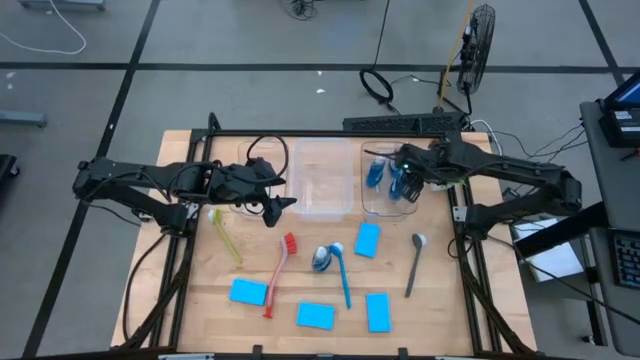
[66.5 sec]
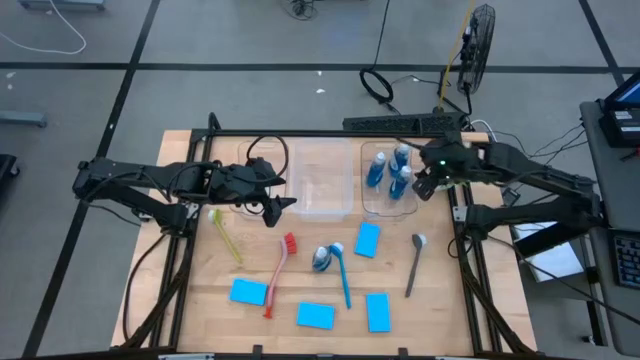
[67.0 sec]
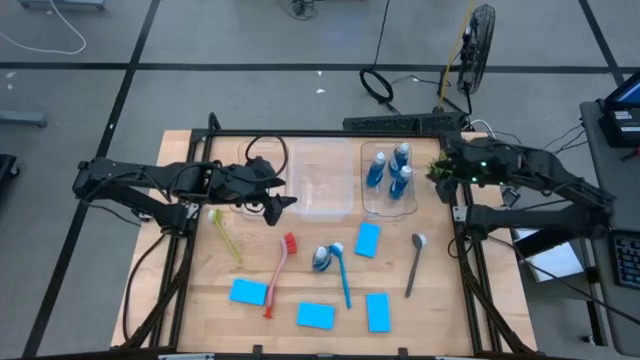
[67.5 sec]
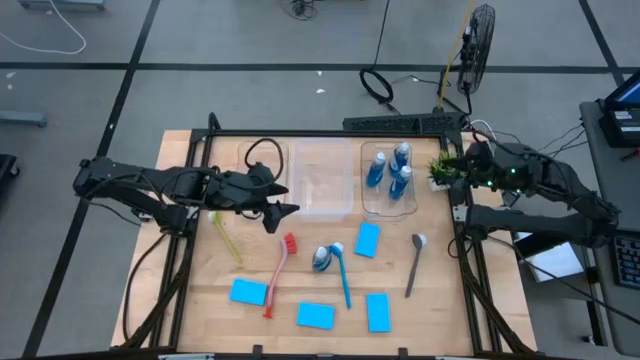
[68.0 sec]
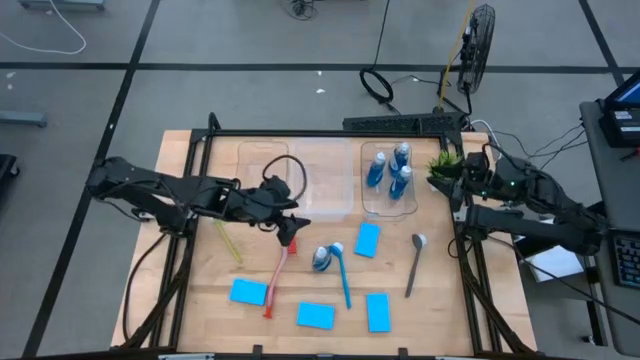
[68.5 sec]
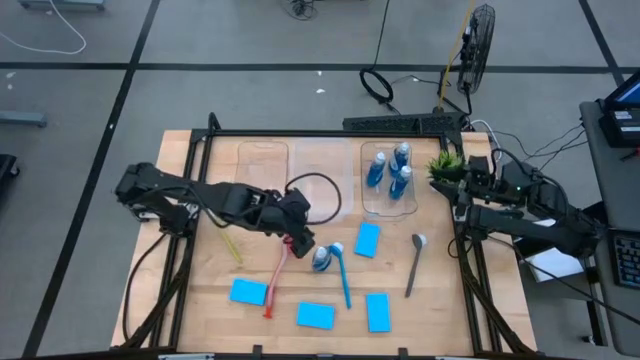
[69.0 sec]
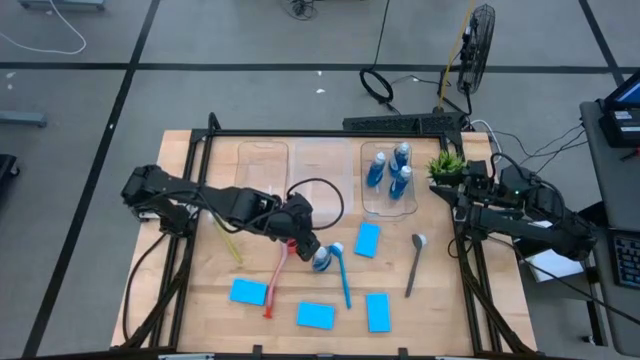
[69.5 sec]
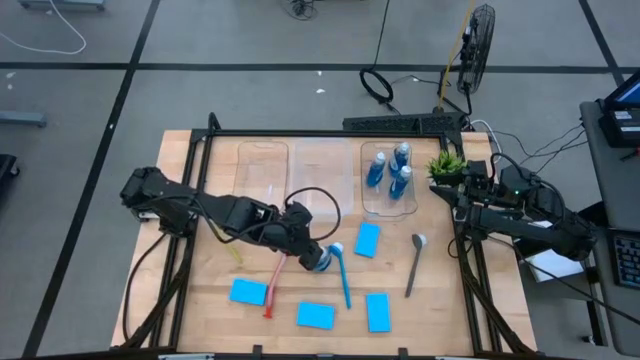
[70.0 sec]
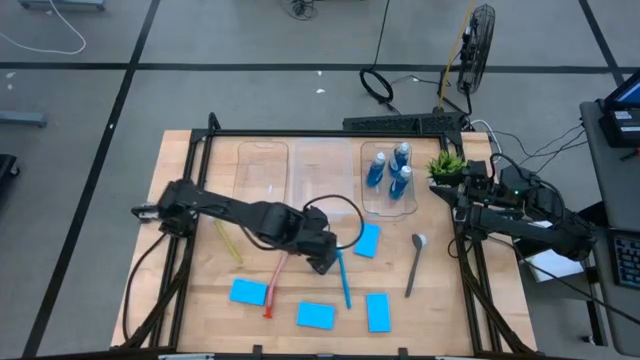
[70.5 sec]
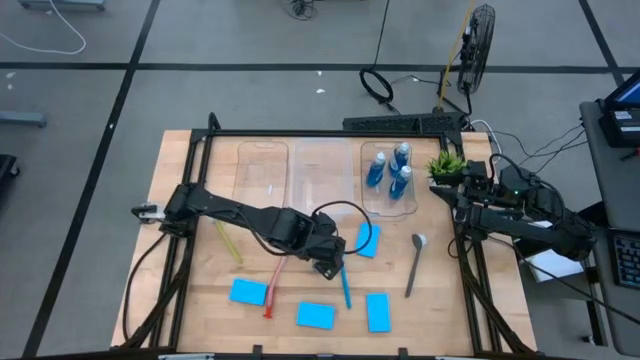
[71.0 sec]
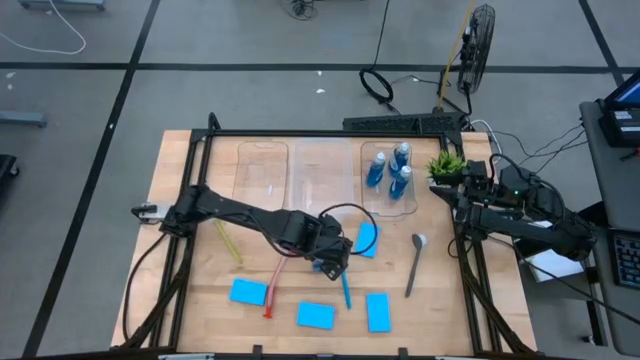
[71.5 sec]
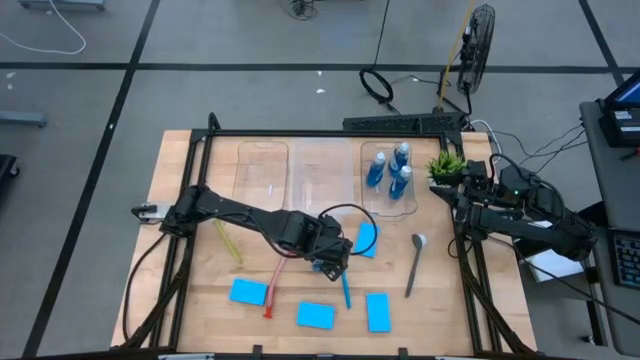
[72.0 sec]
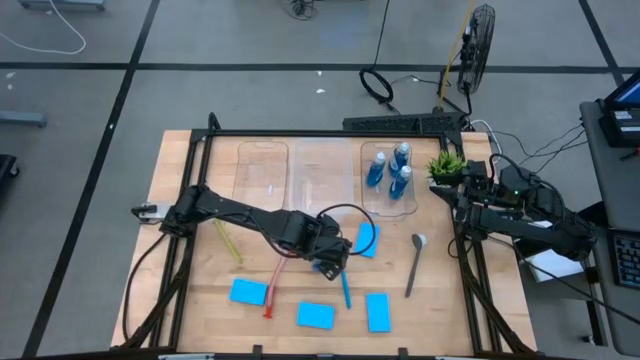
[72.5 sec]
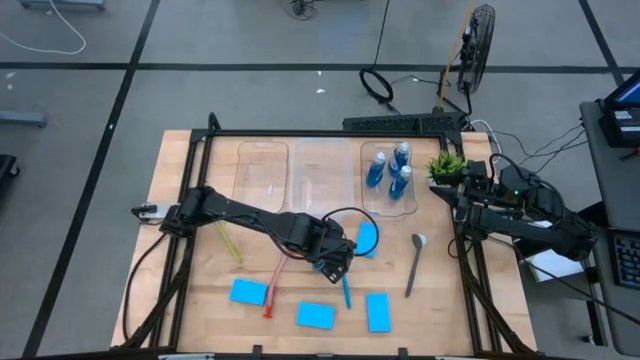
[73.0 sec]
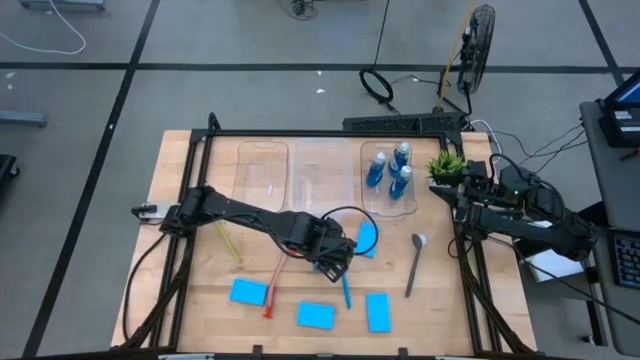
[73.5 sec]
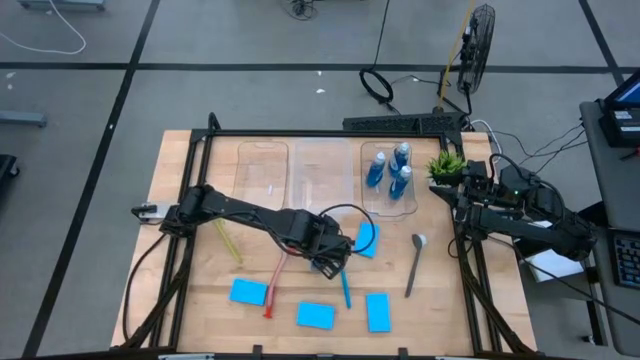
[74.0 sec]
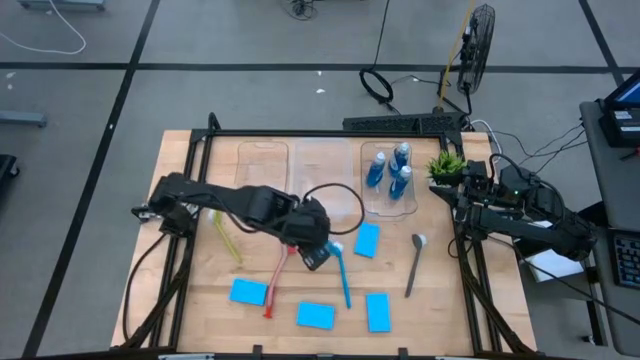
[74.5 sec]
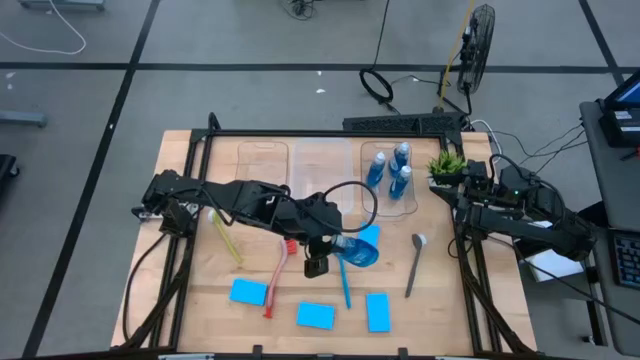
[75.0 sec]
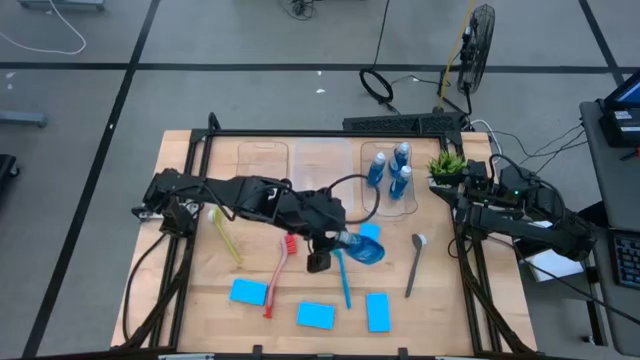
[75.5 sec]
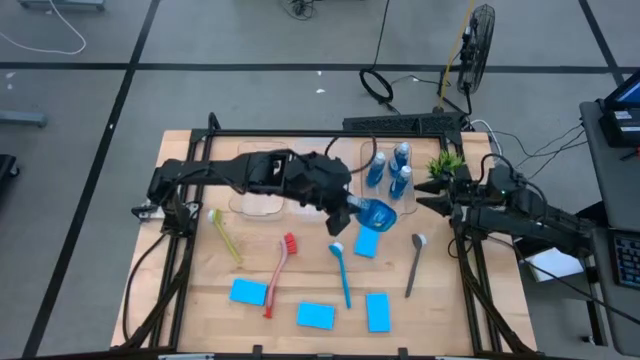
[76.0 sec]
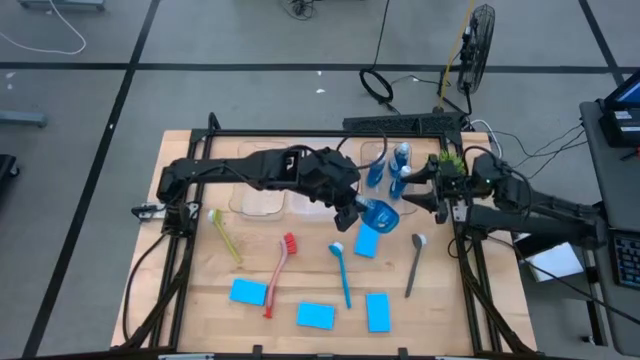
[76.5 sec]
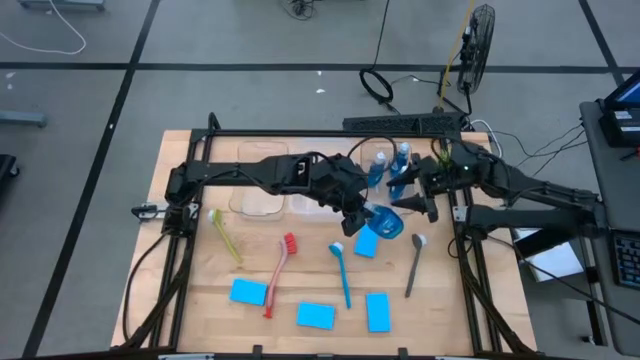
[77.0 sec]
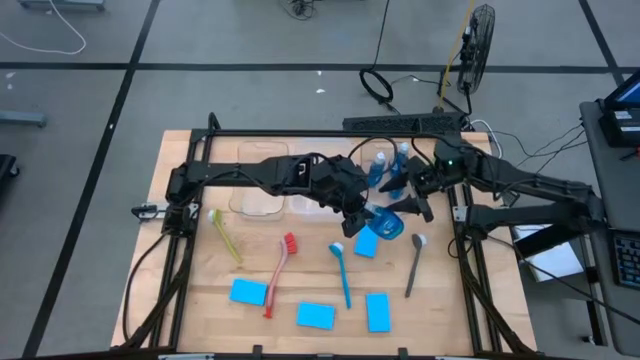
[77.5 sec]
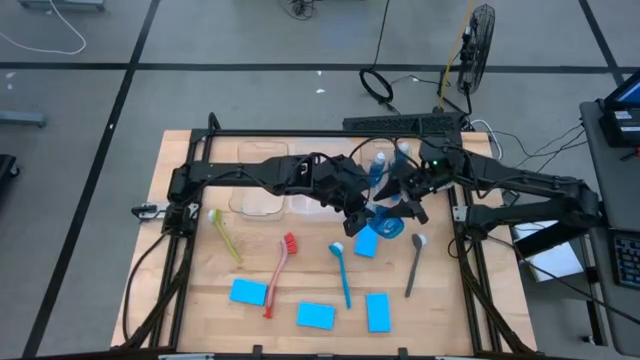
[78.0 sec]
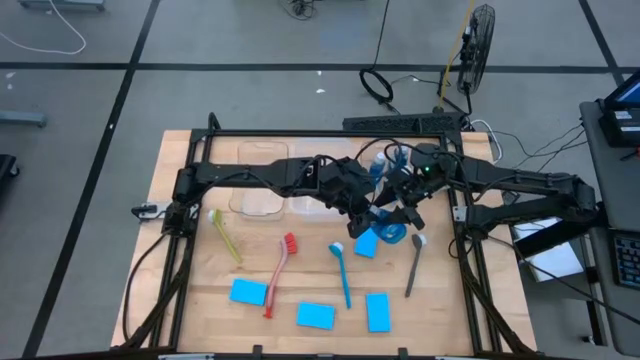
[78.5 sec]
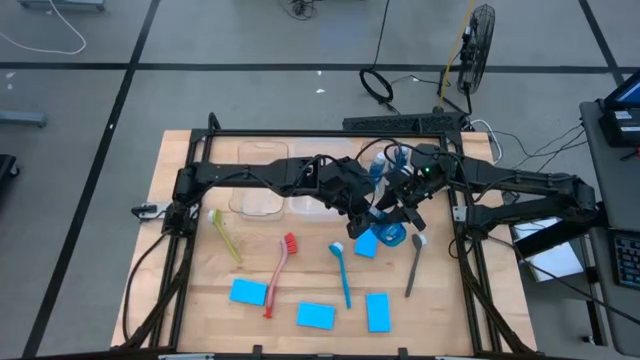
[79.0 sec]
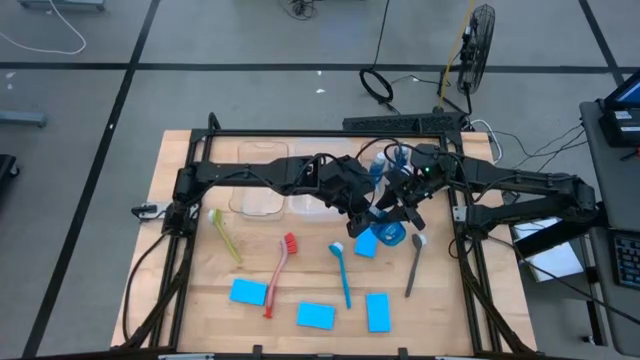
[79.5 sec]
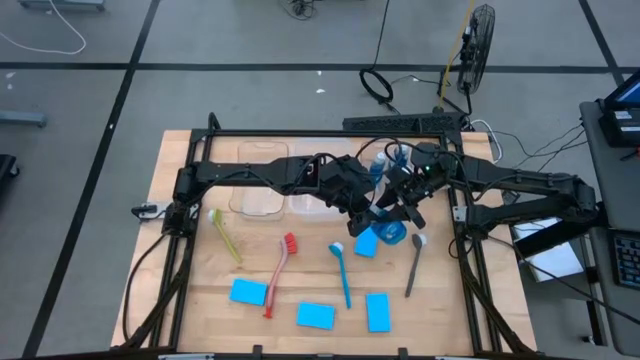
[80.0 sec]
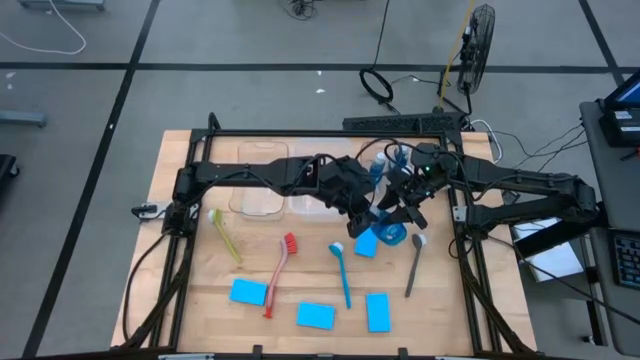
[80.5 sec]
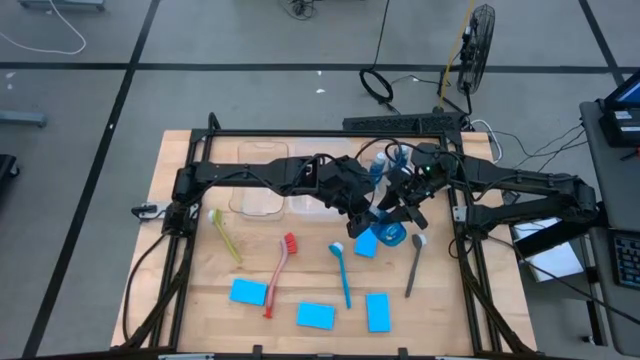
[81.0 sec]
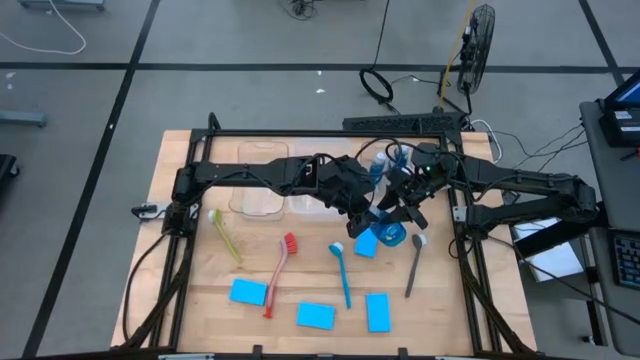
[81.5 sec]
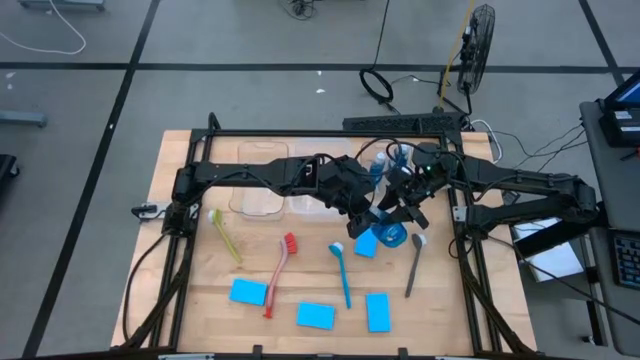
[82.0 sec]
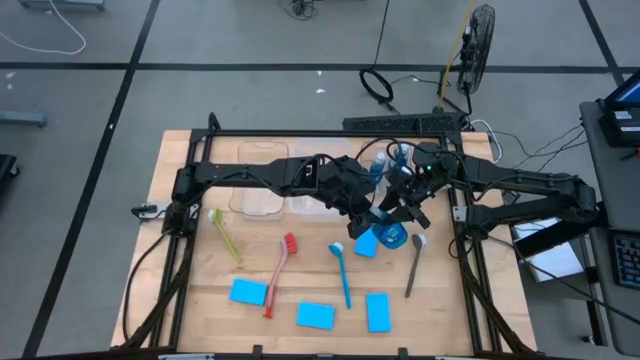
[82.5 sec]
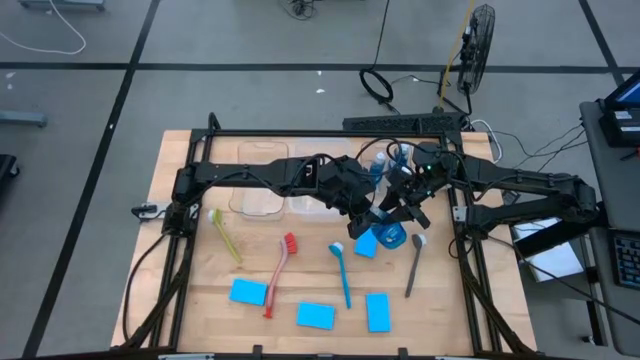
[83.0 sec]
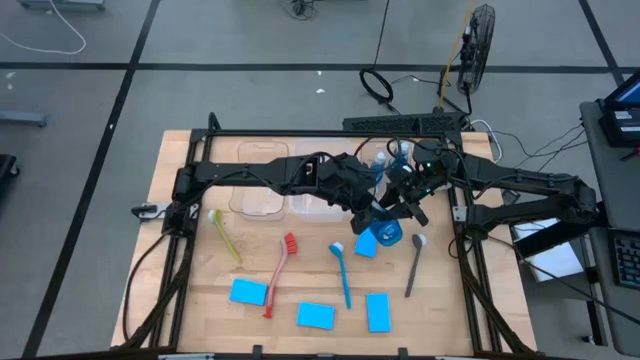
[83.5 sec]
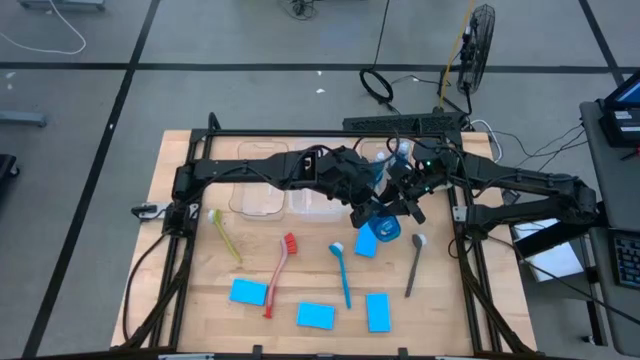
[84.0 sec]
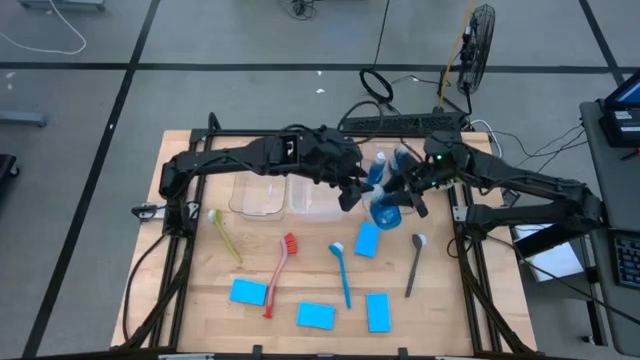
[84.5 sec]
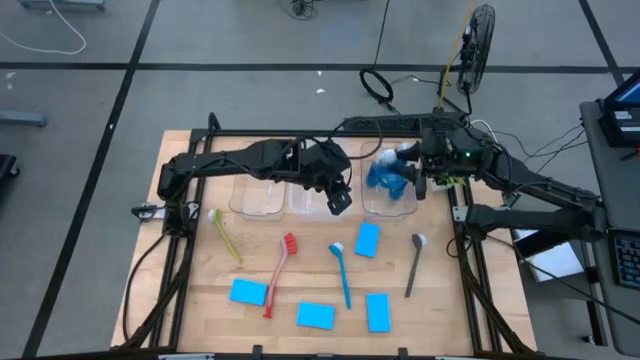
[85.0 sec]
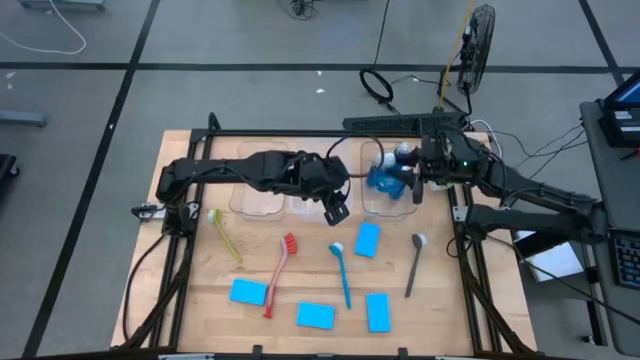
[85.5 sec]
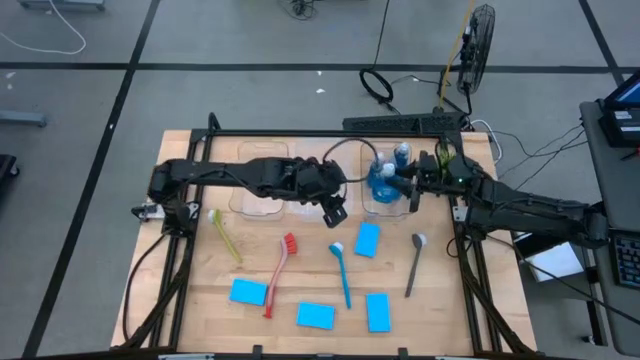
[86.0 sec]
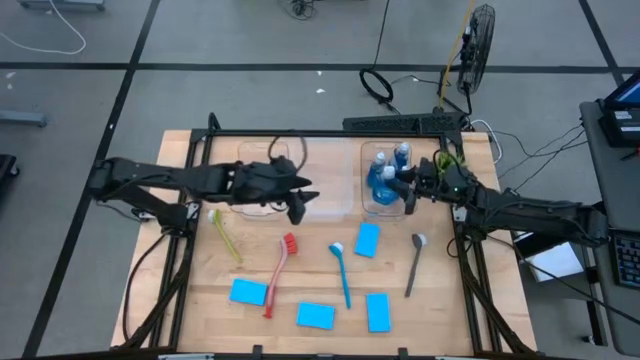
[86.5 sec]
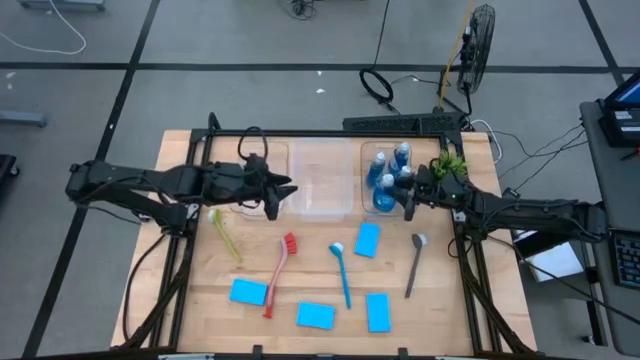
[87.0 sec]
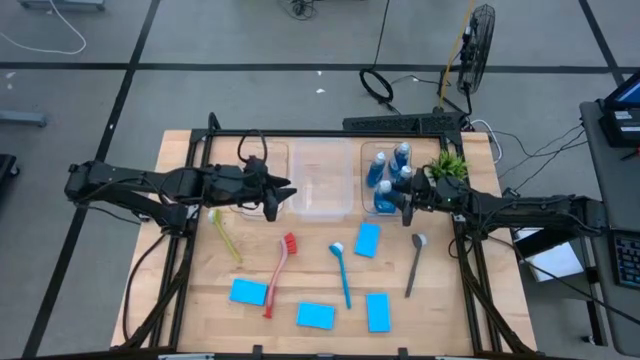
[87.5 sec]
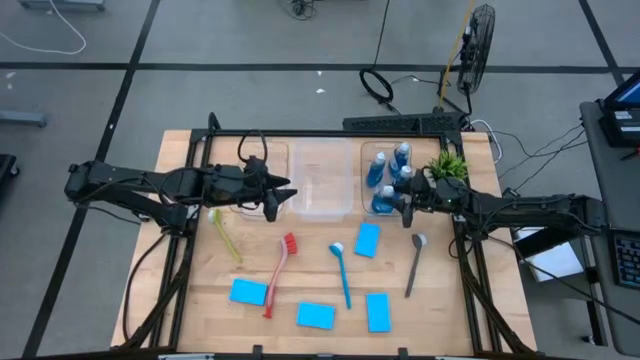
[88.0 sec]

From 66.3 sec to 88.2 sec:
Task: Pick & Place Kitchen Sink Supplies
Put the blue dishwashing liquid bottle into the right transparent bin
